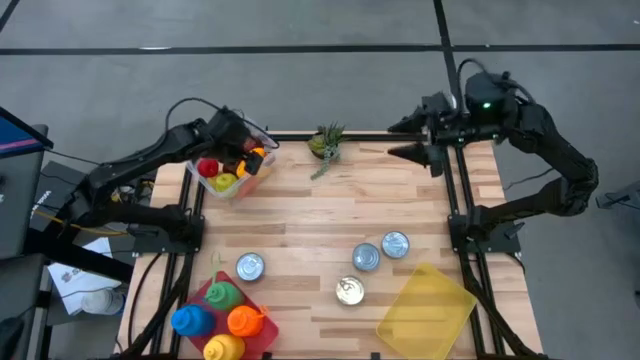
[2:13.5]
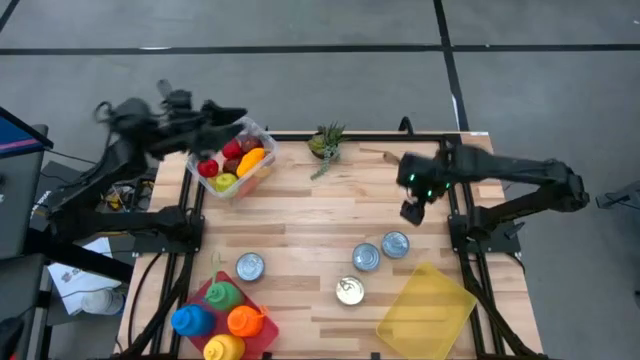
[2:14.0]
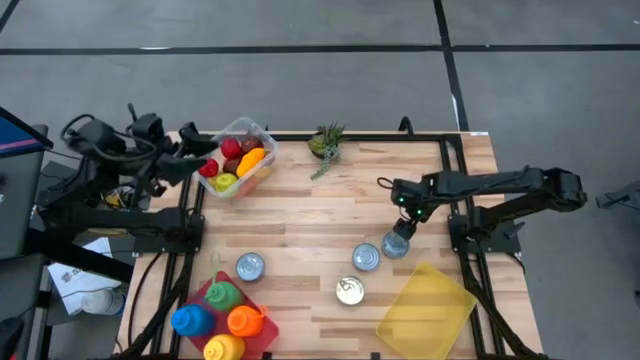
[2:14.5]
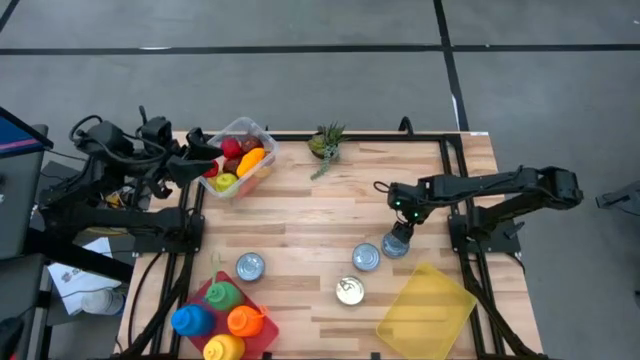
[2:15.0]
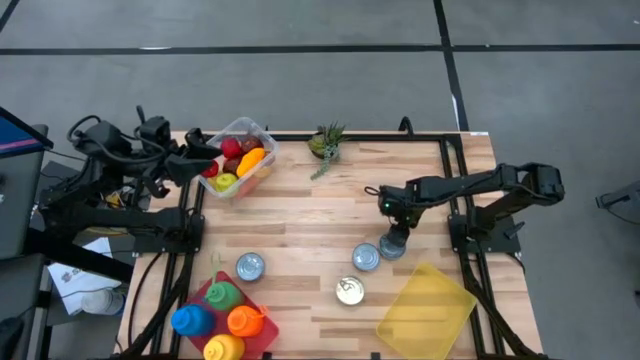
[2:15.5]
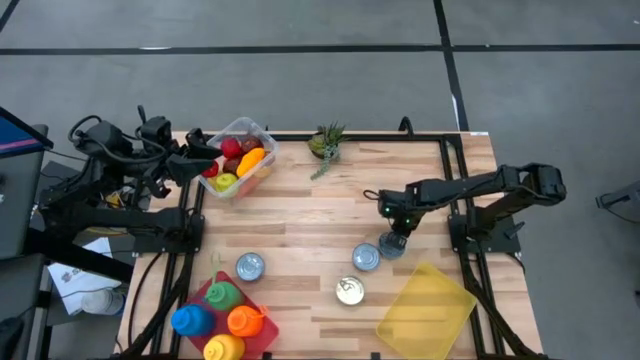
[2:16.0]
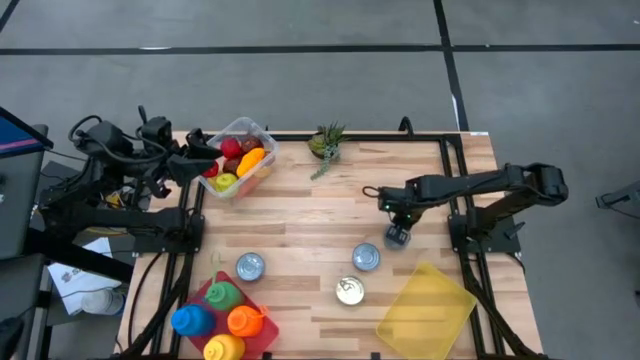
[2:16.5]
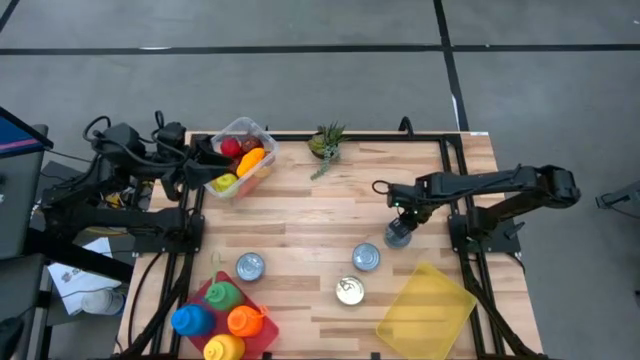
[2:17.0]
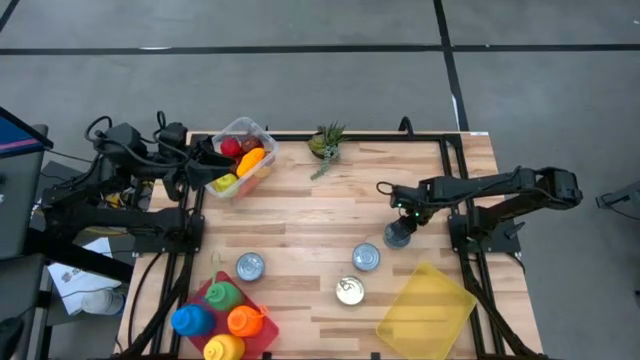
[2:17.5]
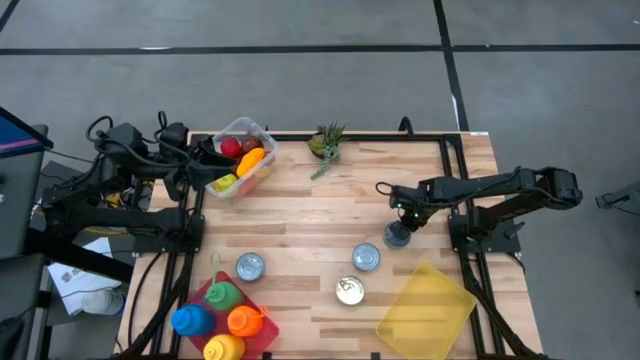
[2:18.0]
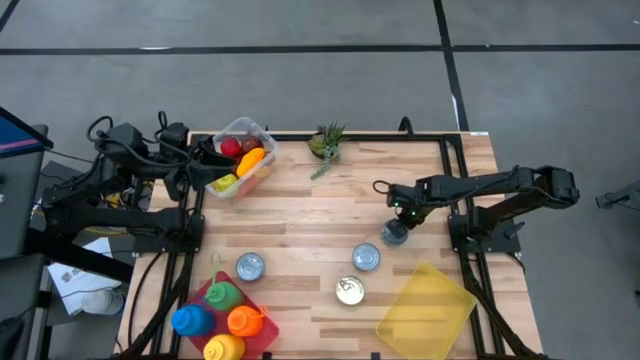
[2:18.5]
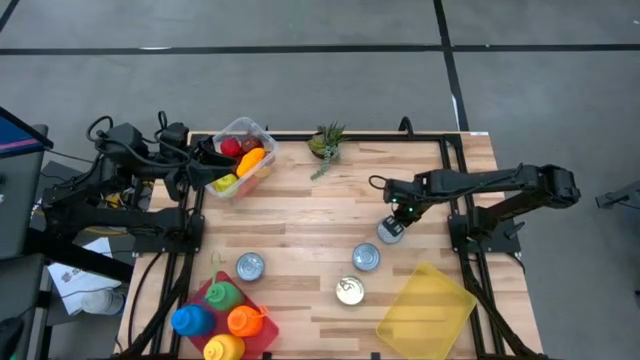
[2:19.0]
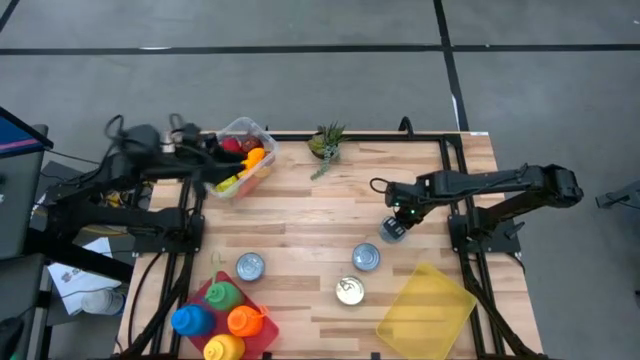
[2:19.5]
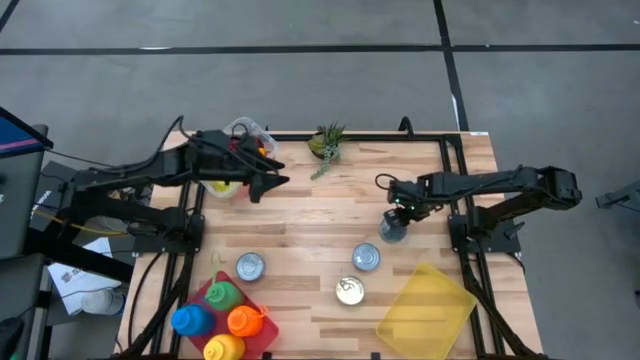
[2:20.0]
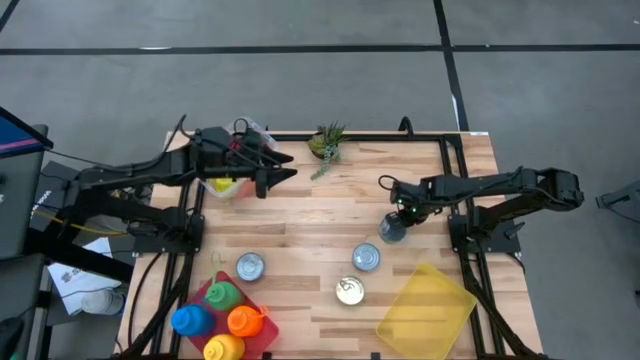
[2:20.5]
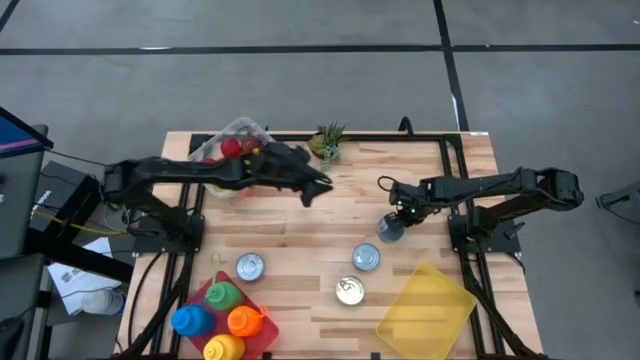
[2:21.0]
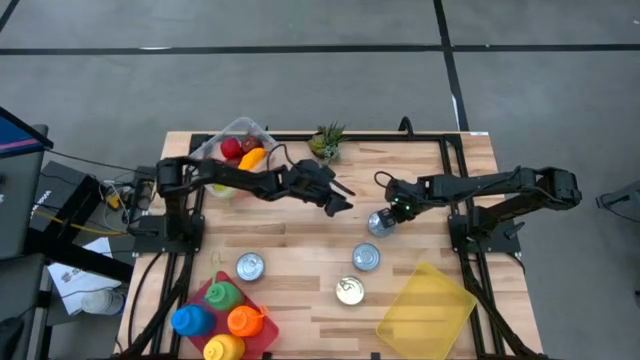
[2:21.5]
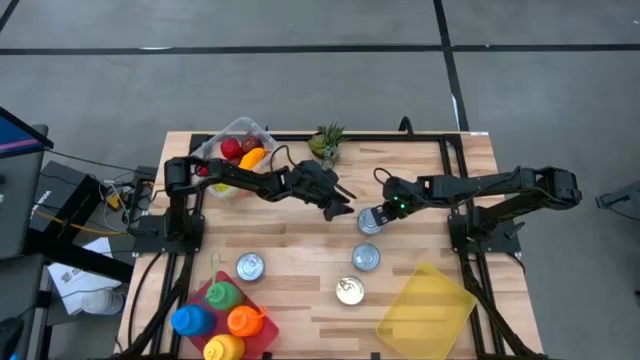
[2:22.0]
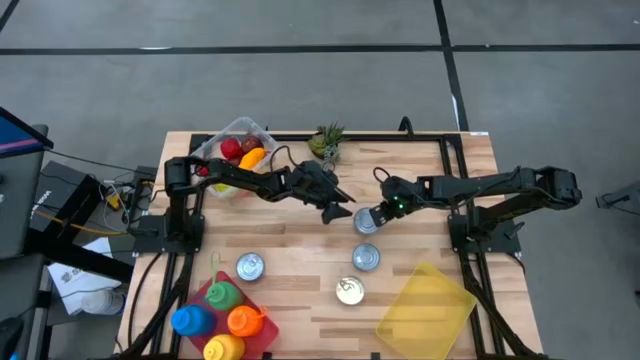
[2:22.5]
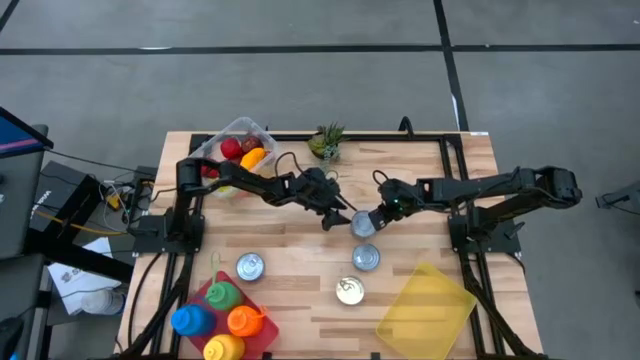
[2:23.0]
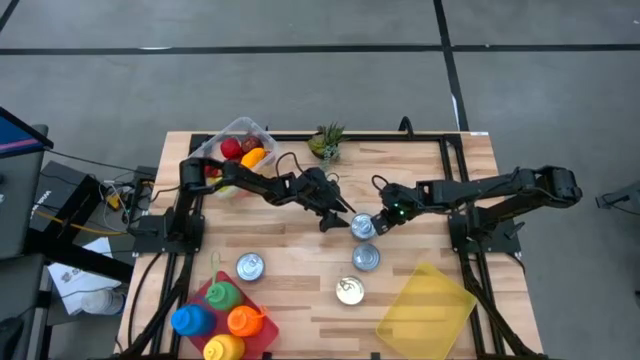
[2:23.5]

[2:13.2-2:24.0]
Task: Pick & Place Food Item
Put the green tuna can into the yellow bin

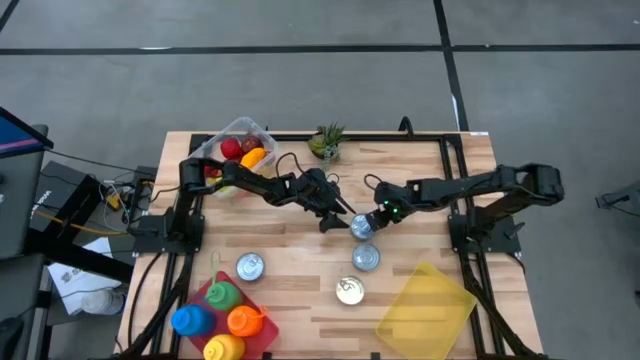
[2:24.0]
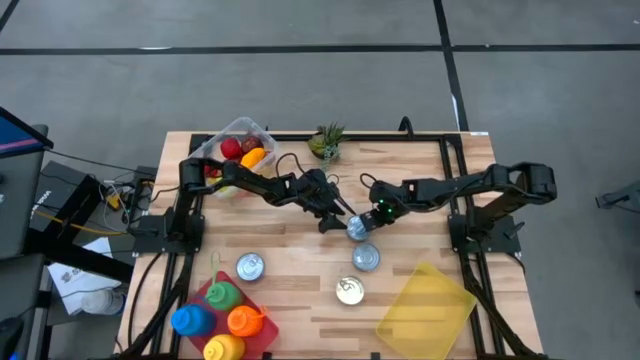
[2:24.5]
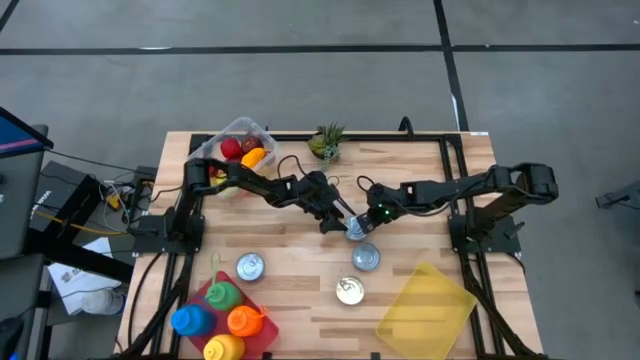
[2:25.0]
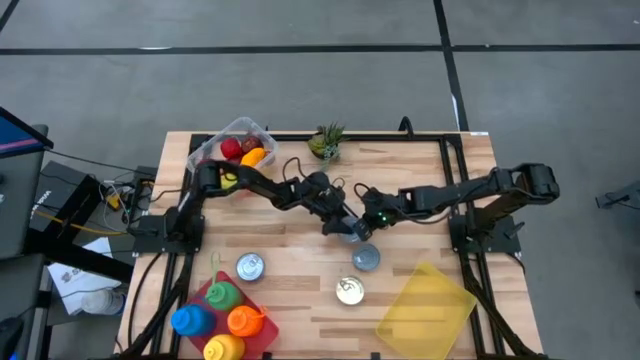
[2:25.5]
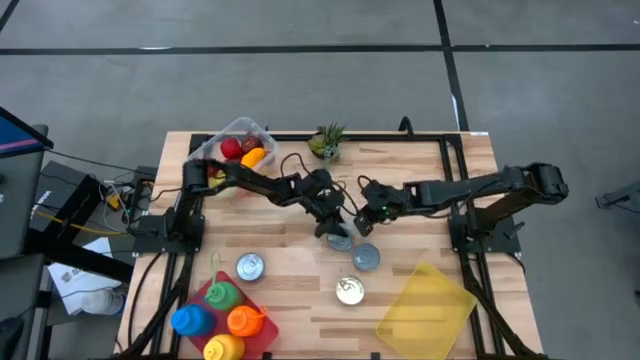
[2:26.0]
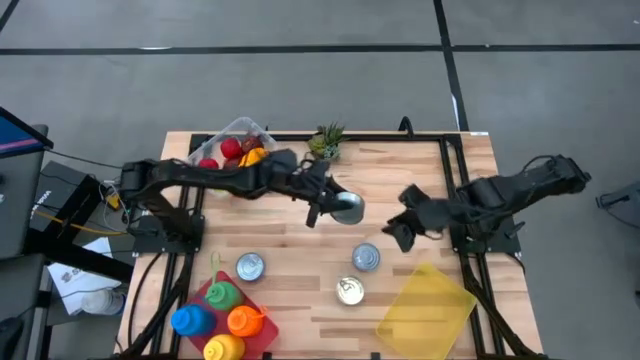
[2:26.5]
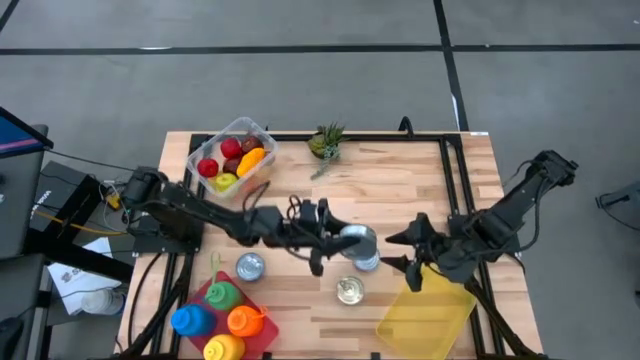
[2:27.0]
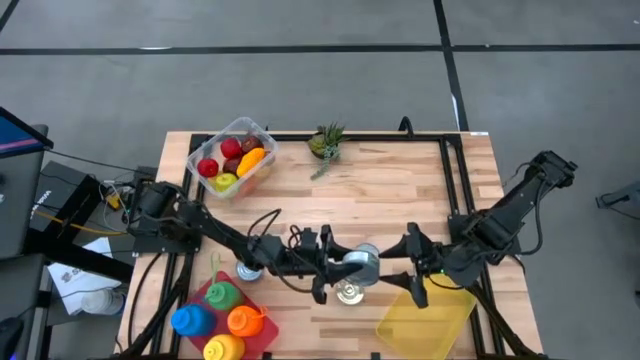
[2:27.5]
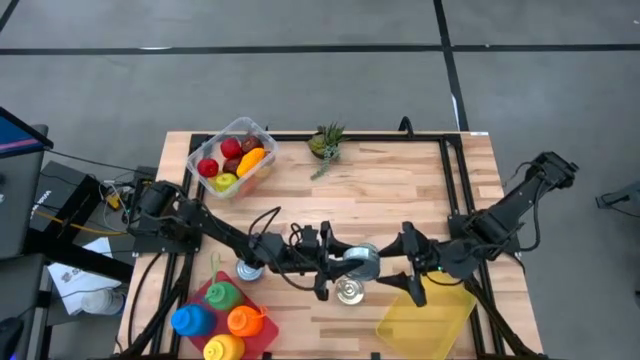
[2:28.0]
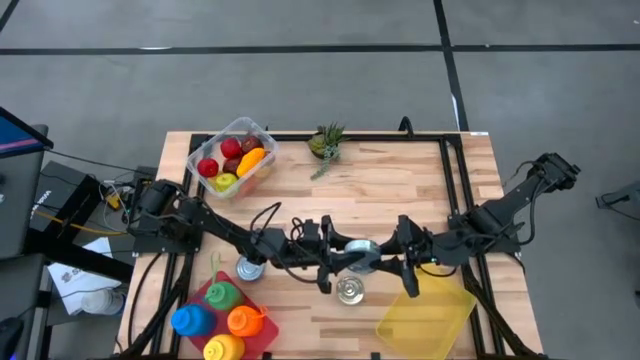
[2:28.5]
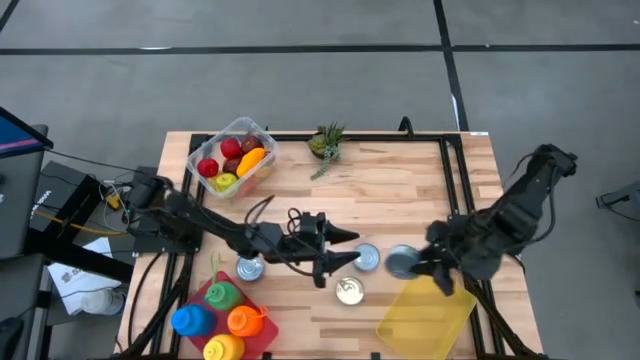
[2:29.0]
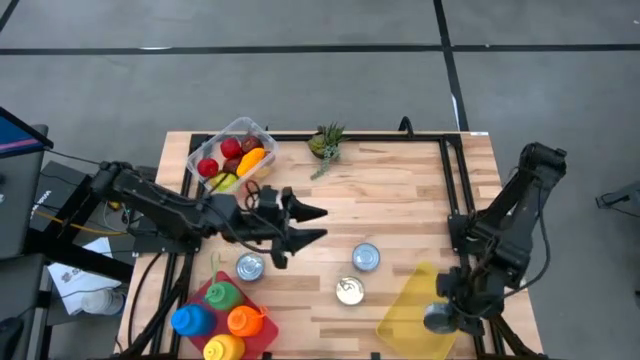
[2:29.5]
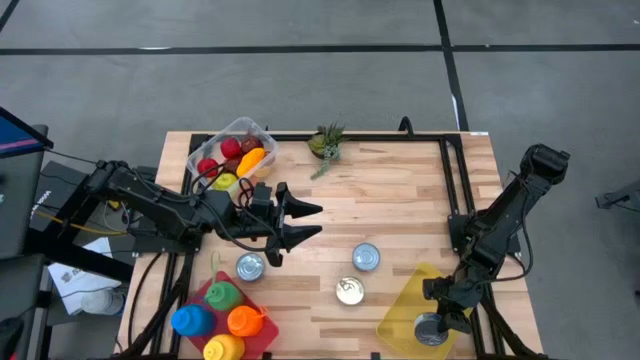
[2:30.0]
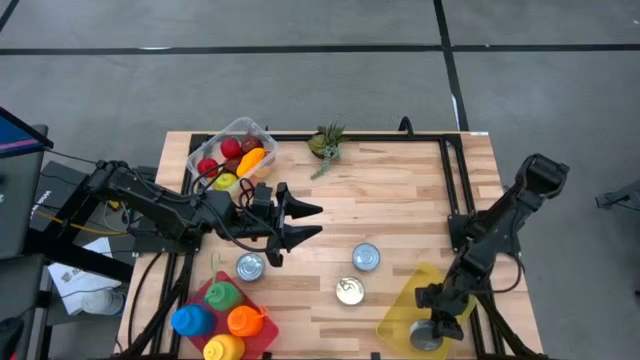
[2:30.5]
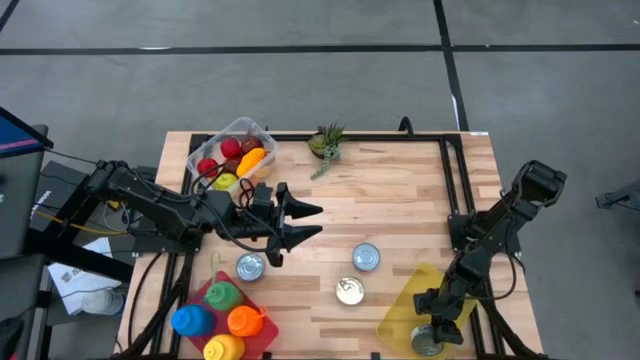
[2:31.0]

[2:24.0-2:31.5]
Put the green tuna can into the yellow bin

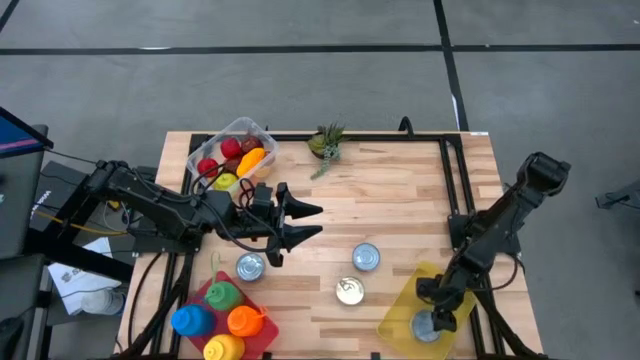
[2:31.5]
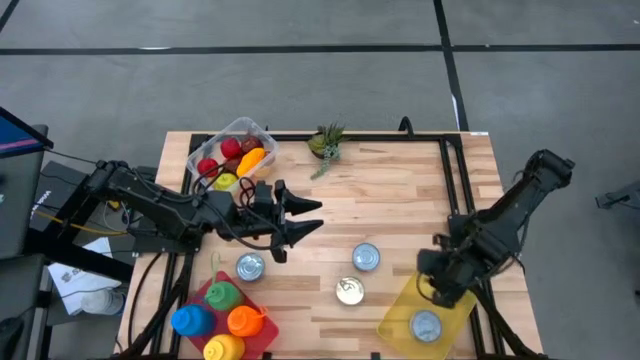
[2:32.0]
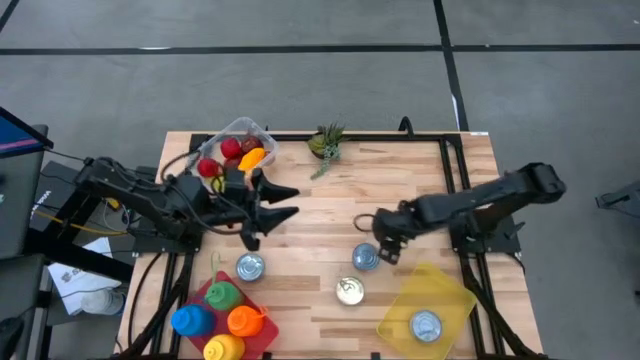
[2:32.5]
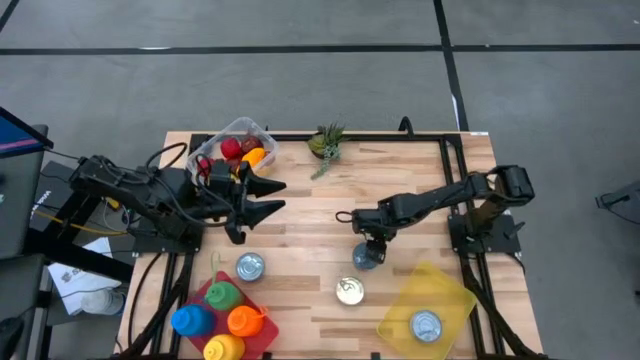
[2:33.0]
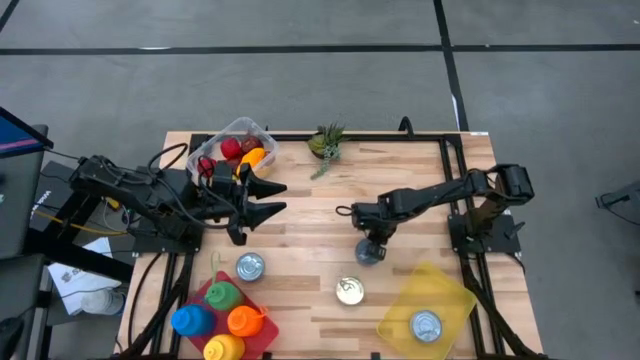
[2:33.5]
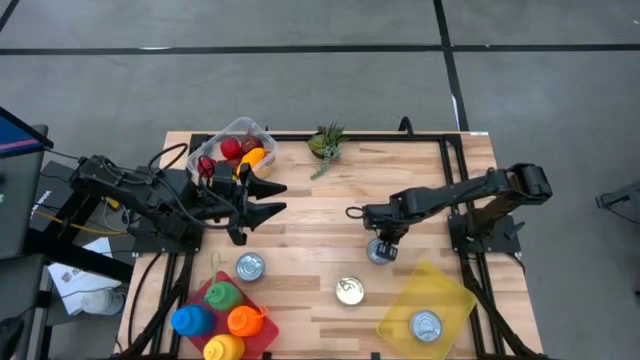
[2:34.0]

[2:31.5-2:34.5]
Put the red tuna can into the yellow bin

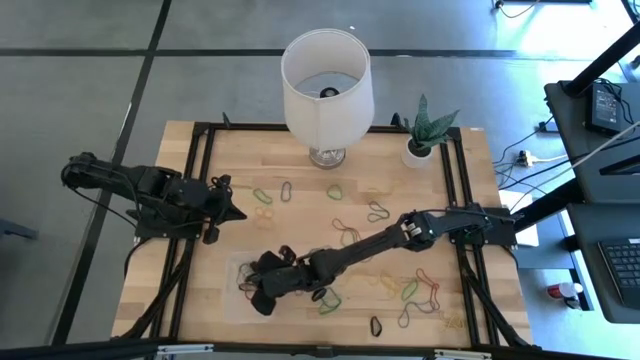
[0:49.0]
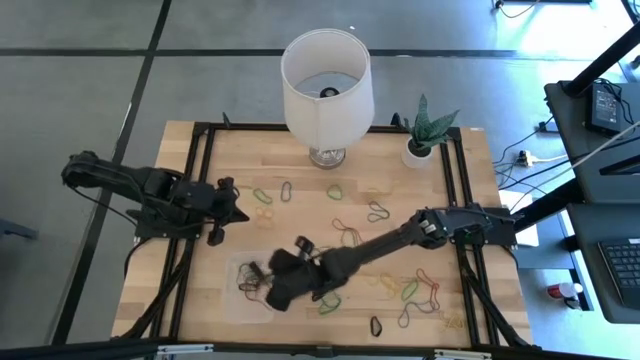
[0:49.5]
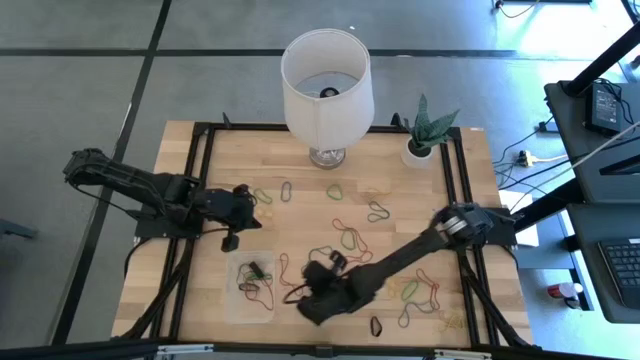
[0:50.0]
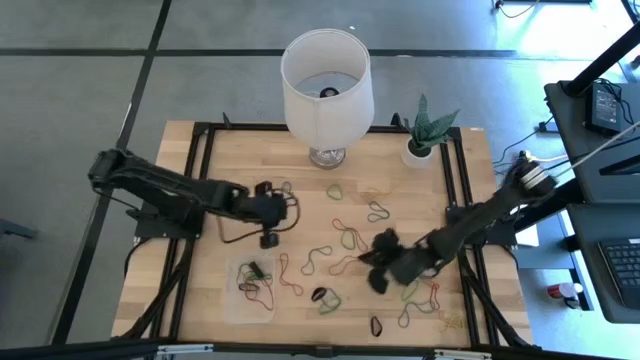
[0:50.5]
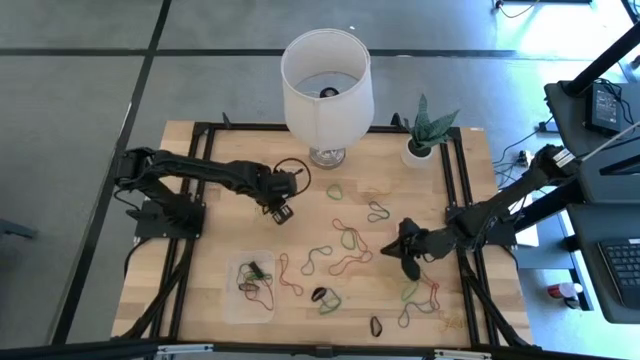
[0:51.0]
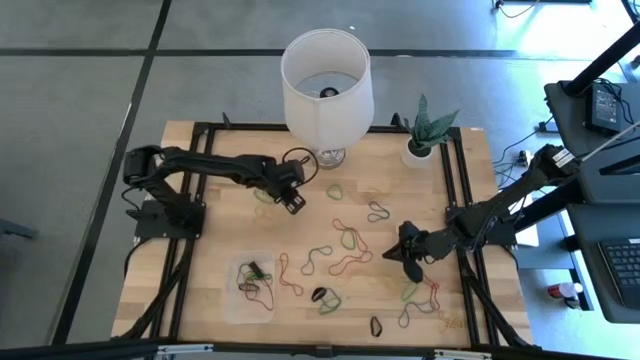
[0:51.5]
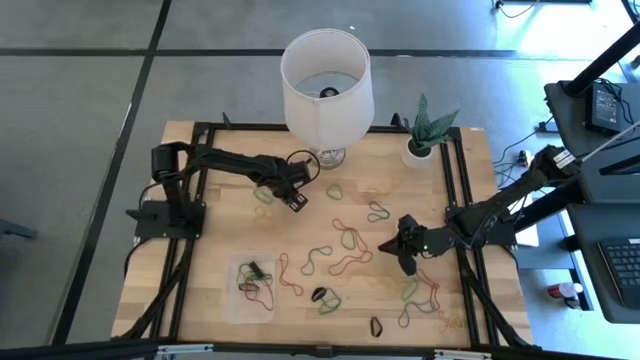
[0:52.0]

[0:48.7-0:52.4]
Task: Pick and place rubber bands into bin
Put the blue rubber band into the transparent bin
